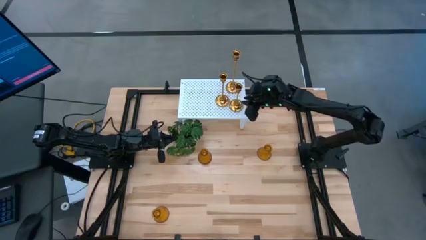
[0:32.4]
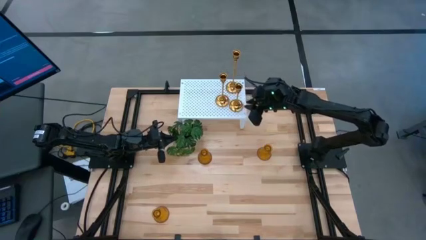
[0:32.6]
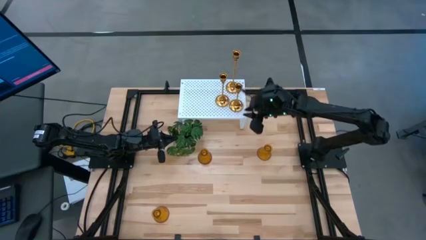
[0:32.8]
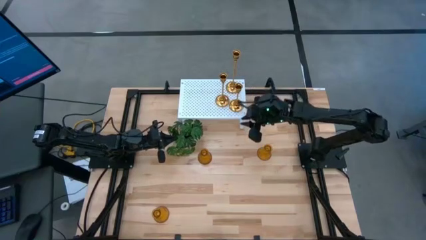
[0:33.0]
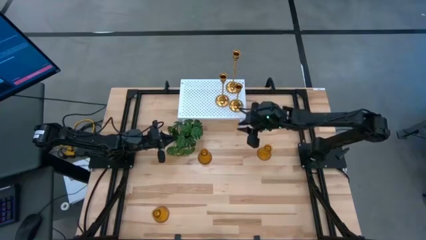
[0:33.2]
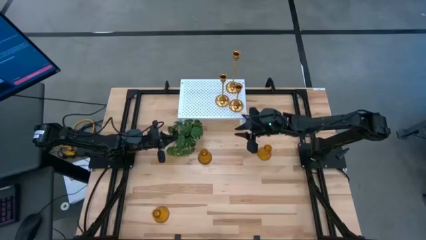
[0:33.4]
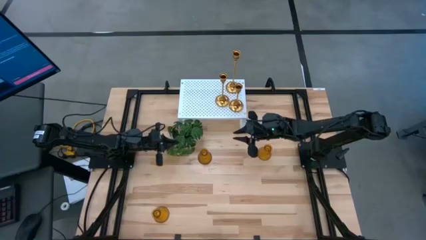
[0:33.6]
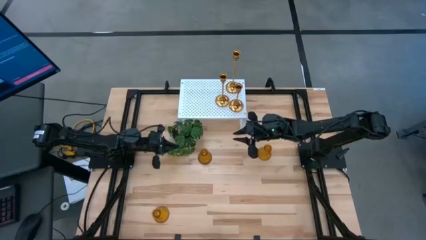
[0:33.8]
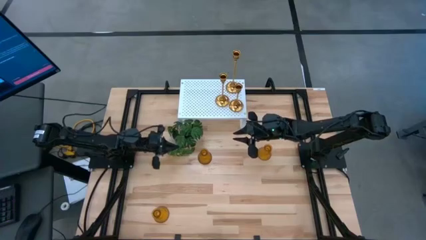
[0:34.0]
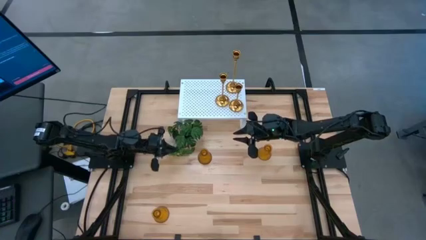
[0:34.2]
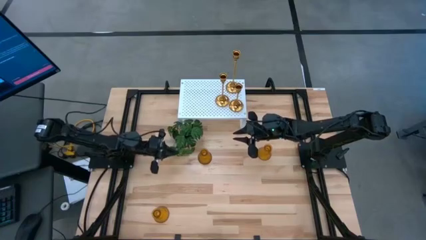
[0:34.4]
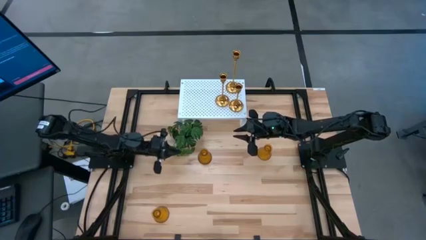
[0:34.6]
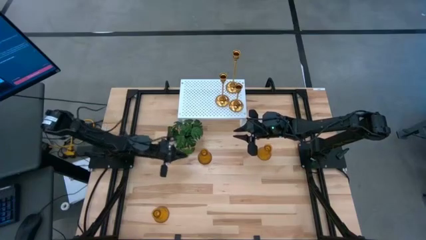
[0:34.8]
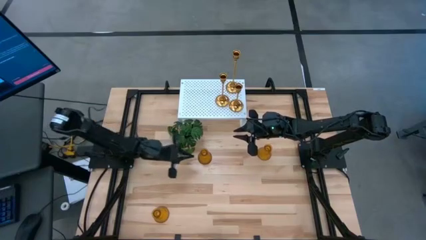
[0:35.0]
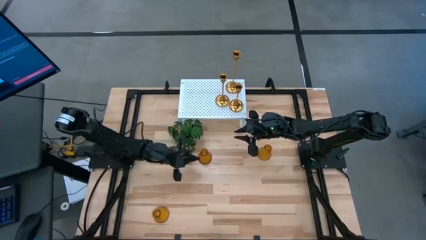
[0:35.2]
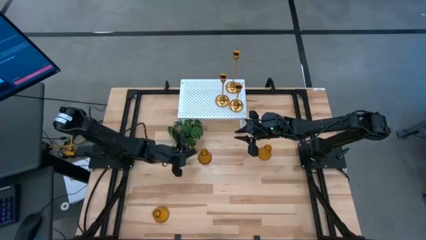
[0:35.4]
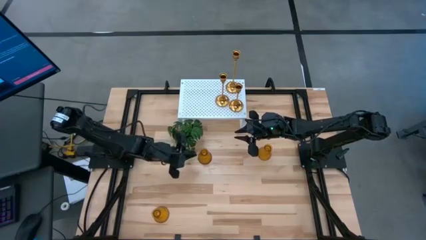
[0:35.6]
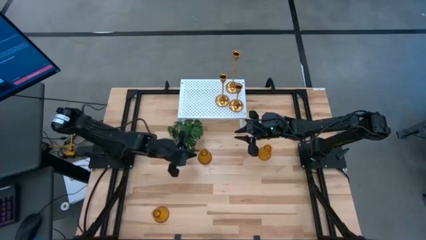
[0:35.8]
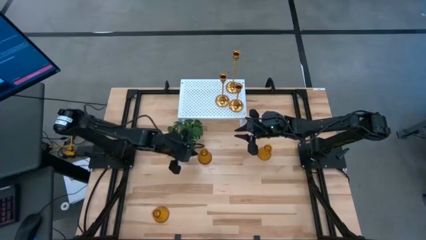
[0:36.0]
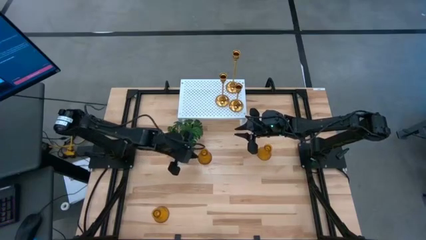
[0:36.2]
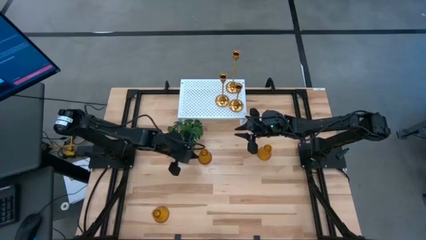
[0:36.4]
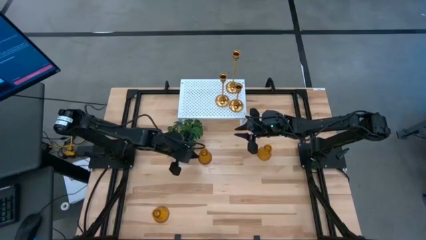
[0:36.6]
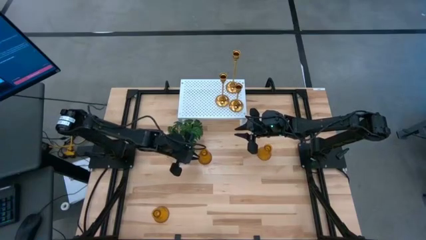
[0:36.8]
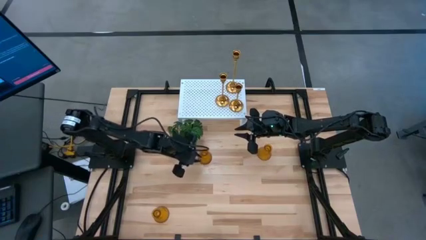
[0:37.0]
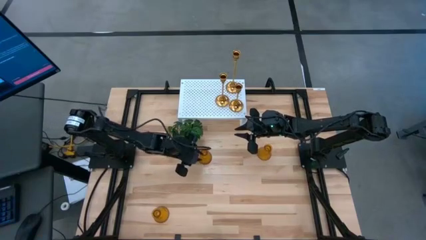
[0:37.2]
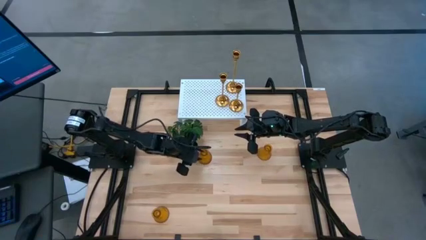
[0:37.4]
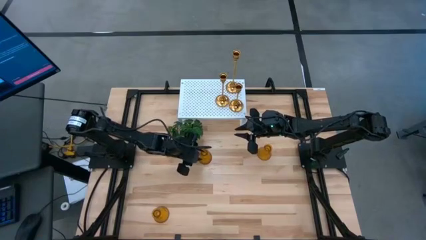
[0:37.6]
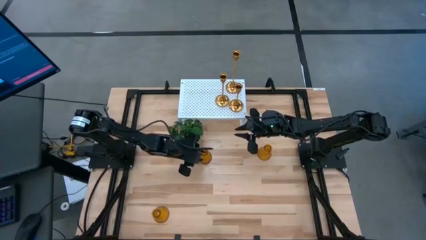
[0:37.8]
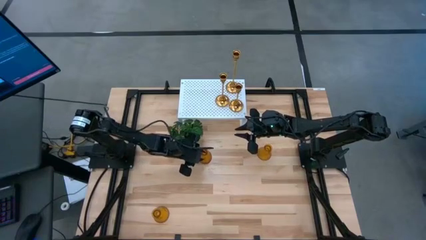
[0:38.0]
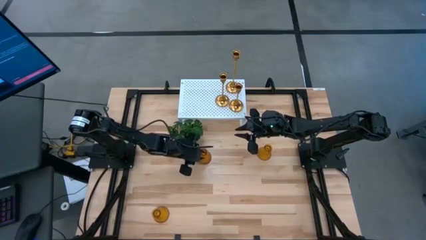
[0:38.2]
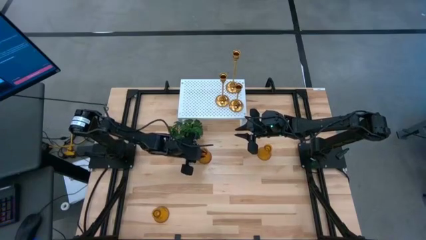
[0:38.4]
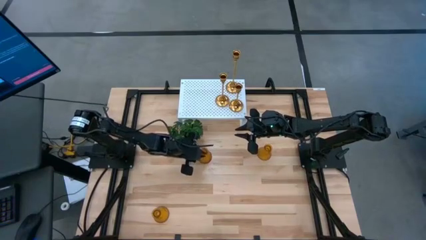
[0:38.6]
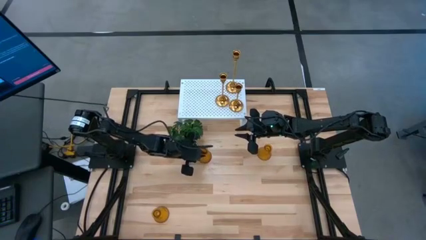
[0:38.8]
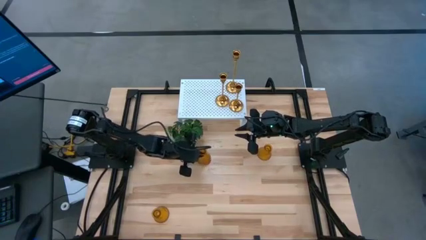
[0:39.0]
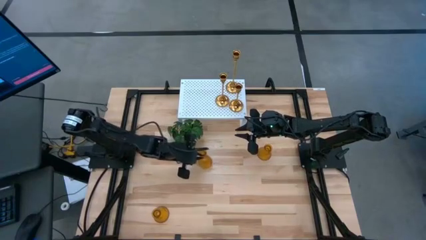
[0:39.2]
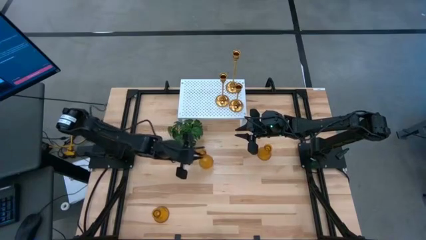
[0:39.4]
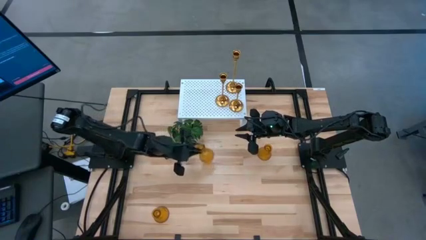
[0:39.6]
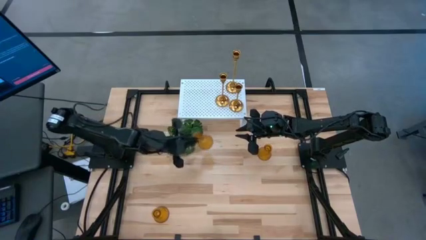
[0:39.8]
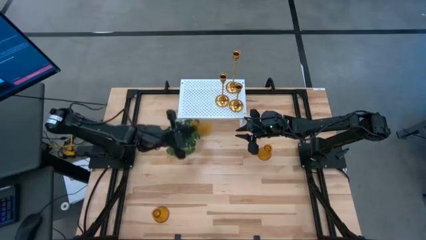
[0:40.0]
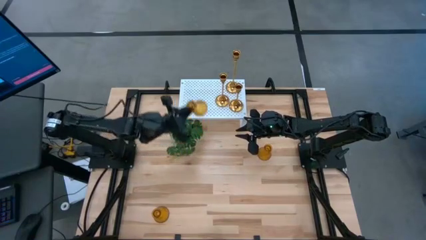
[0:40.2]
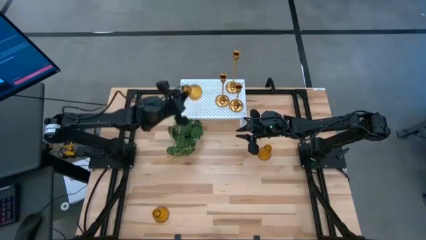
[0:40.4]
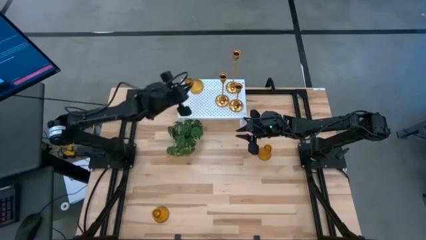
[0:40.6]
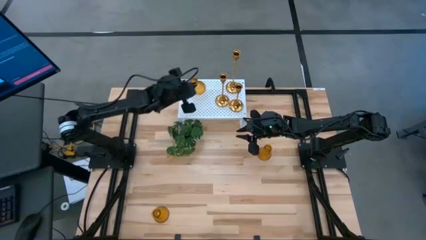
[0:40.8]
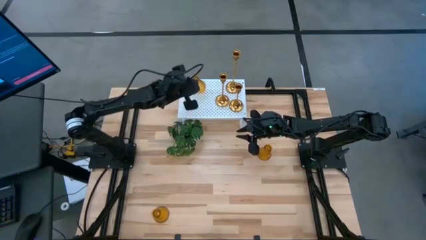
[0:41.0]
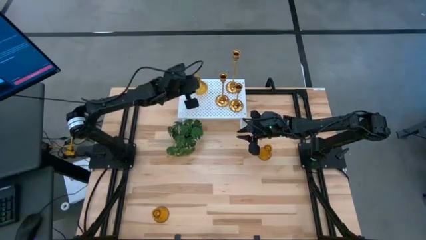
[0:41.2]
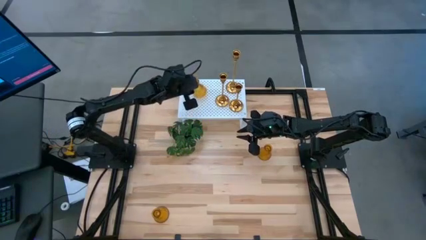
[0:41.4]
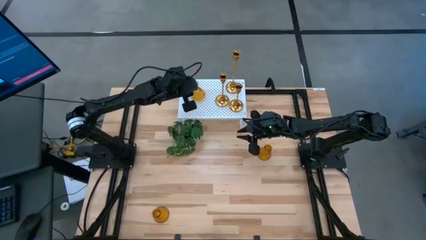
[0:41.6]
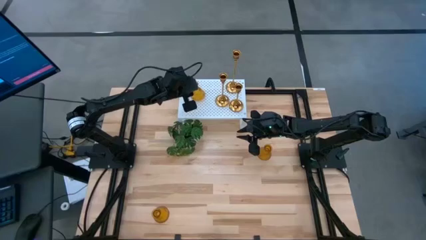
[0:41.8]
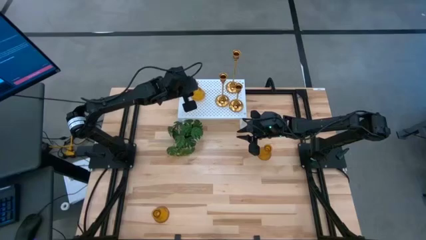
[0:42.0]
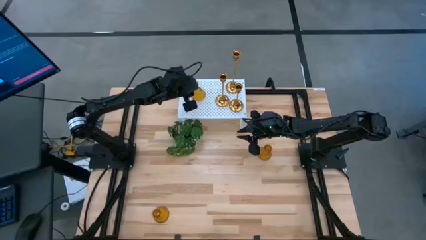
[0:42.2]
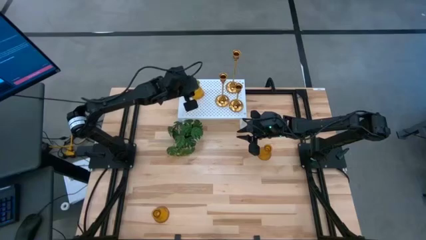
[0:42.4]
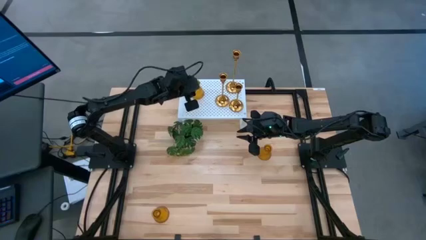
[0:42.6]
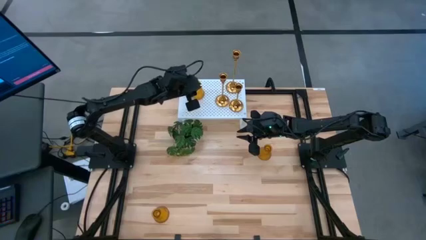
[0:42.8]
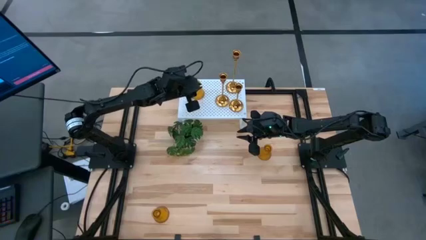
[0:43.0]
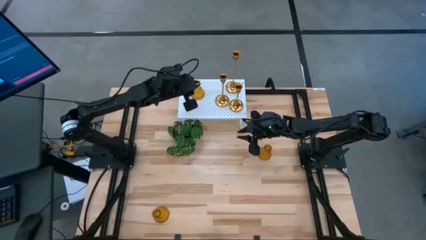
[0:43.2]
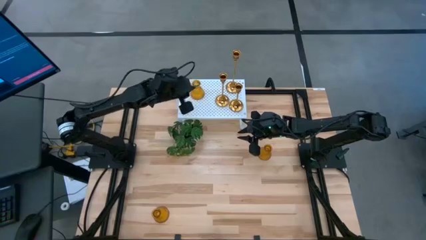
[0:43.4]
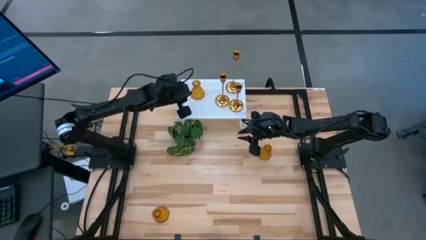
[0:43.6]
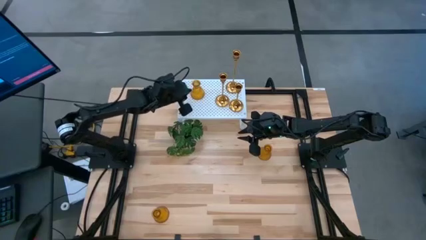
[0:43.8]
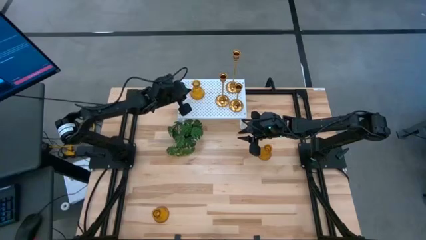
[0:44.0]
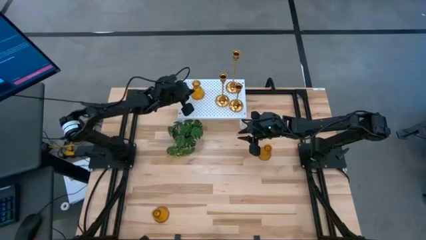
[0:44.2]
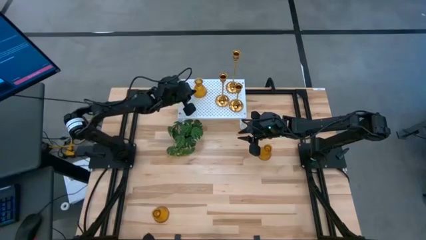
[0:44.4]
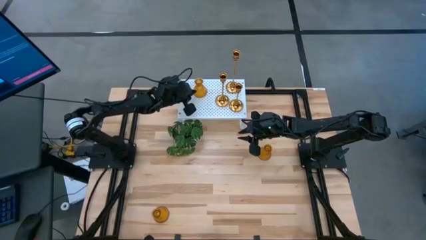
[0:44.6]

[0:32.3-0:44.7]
Task: Pick & Place candle stick holders
Put the top left yellow glass candle holder on the shelf

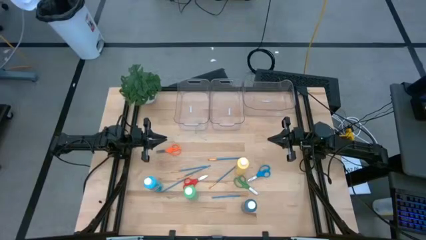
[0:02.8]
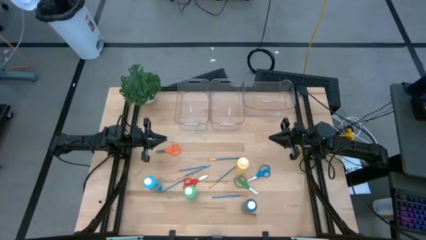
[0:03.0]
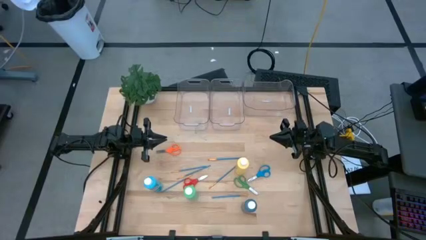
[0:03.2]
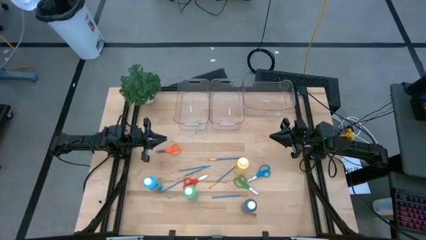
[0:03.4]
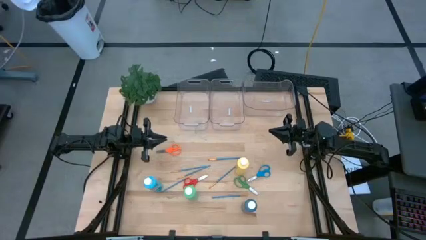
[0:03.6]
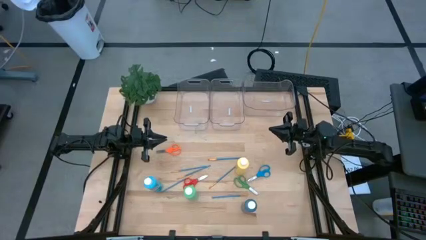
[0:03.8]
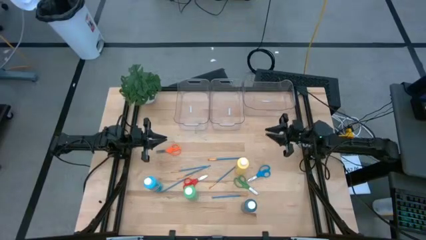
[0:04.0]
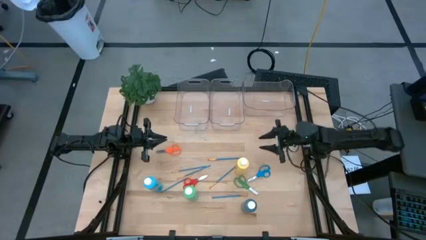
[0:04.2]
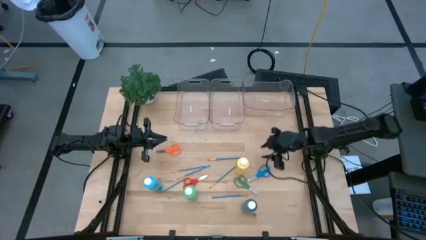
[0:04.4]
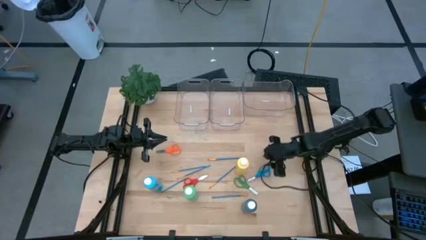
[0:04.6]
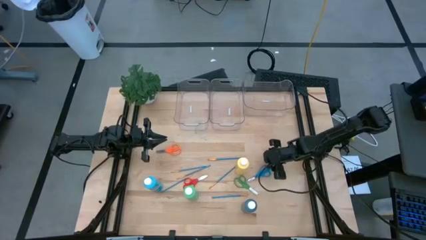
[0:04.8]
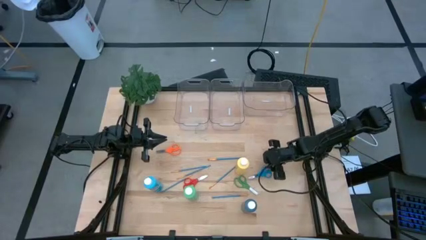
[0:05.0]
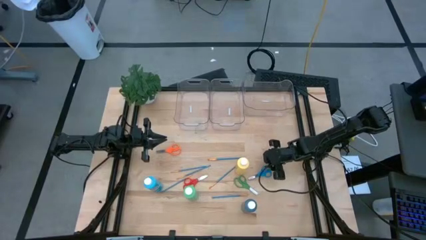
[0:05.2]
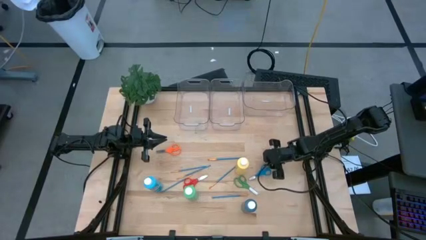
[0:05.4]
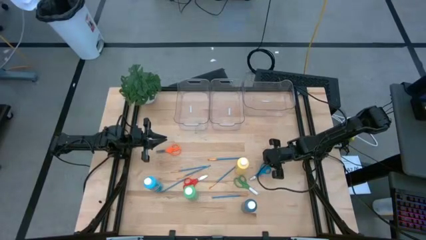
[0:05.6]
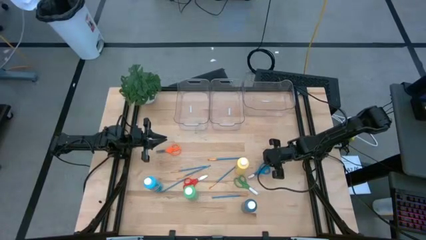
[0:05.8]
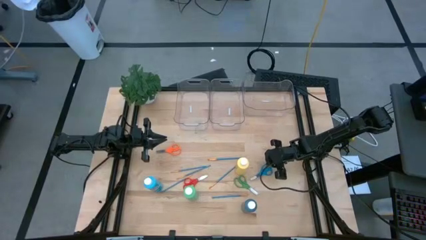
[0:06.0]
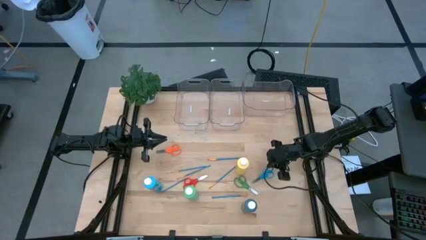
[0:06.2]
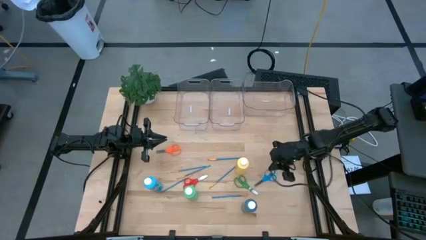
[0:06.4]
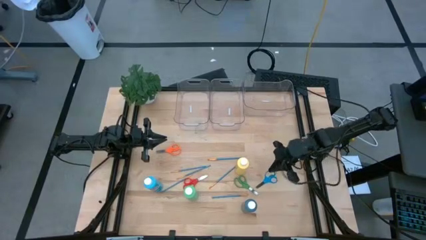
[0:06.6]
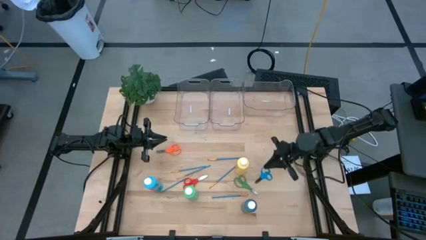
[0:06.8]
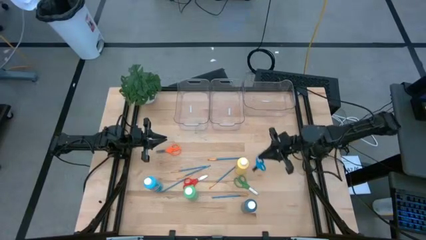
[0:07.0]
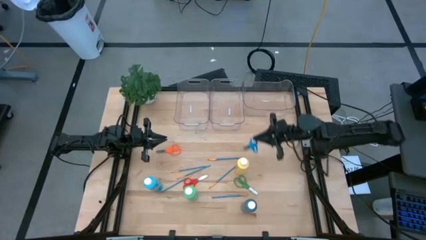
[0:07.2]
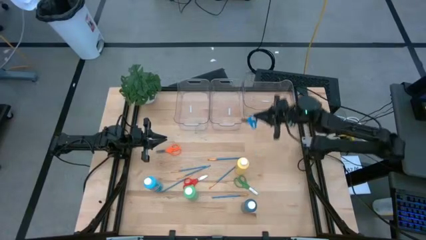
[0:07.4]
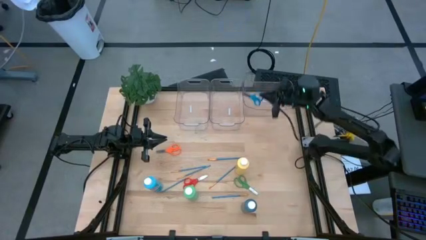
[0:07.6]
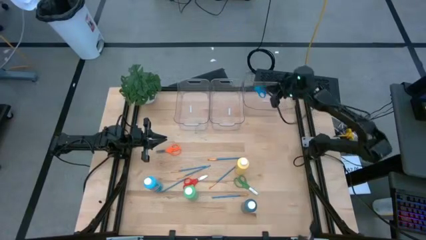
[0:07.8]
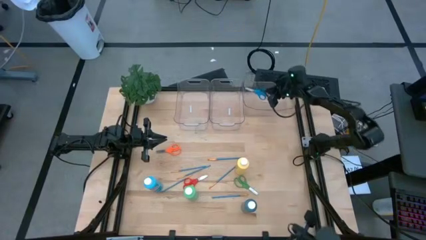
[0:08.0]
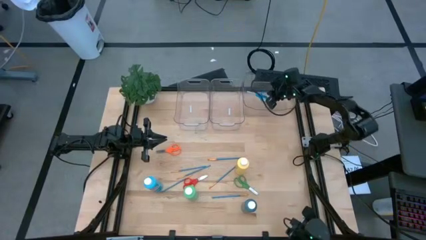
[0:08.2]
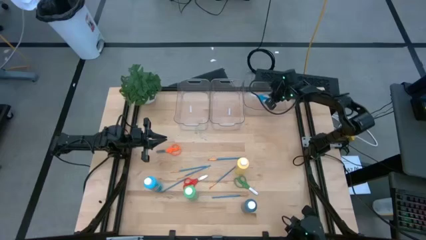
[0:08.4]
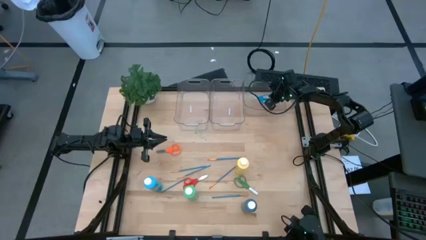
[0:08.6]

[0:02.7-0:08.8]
Task: Pick & Place Paint Supplies
Put the blue scissors into the right transparent bin
